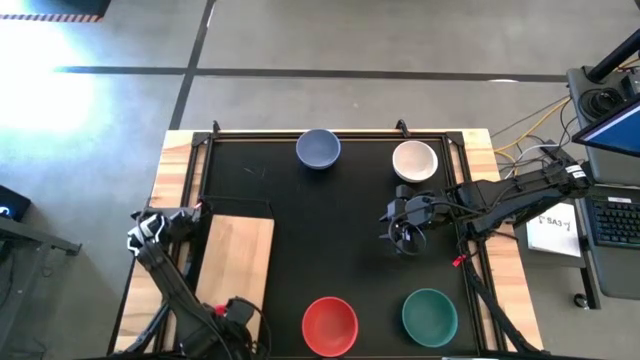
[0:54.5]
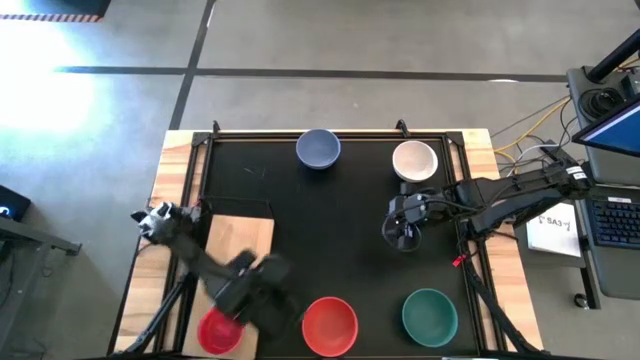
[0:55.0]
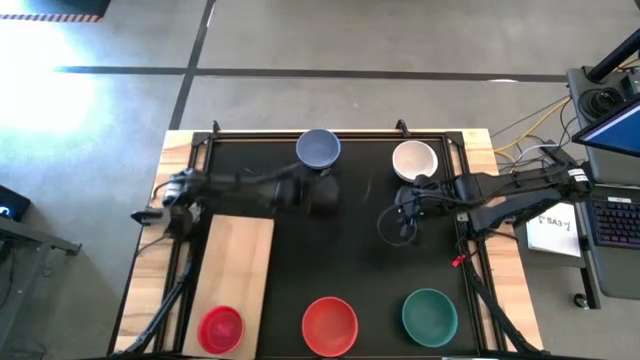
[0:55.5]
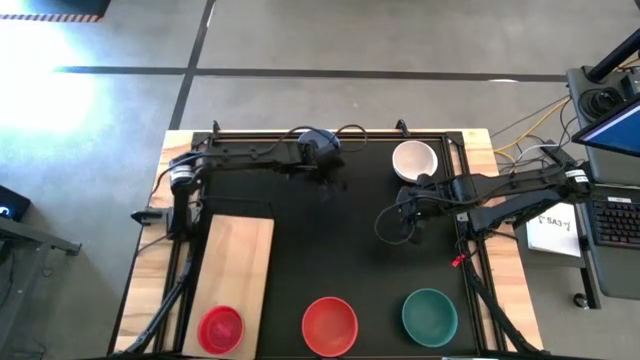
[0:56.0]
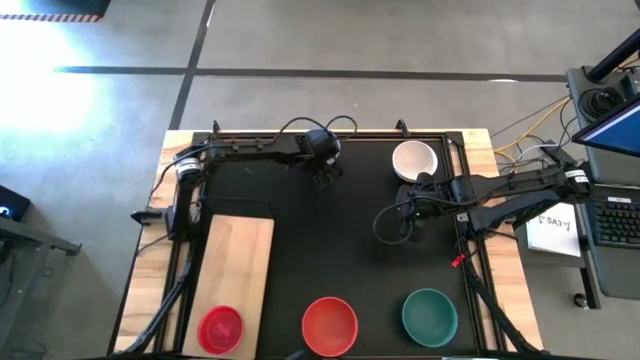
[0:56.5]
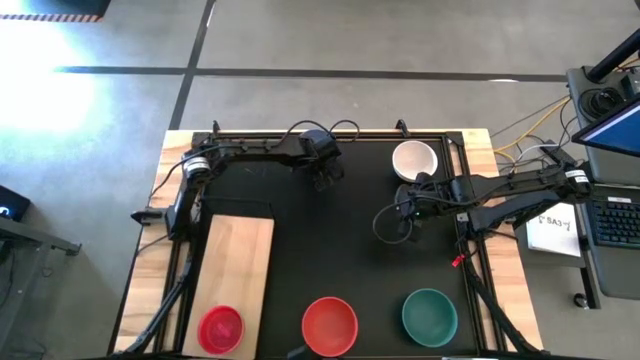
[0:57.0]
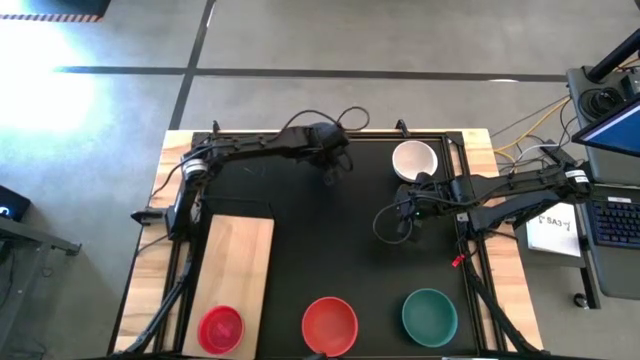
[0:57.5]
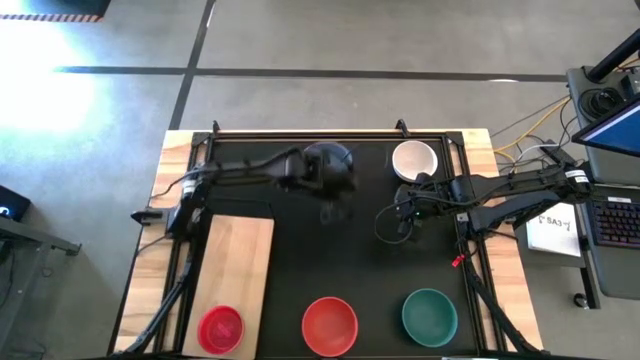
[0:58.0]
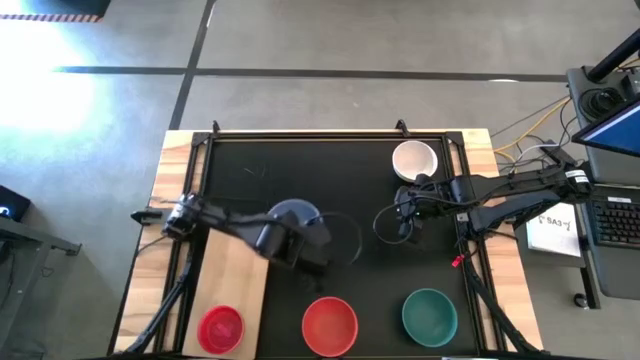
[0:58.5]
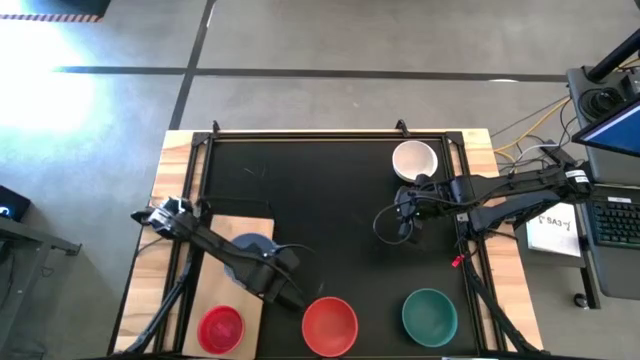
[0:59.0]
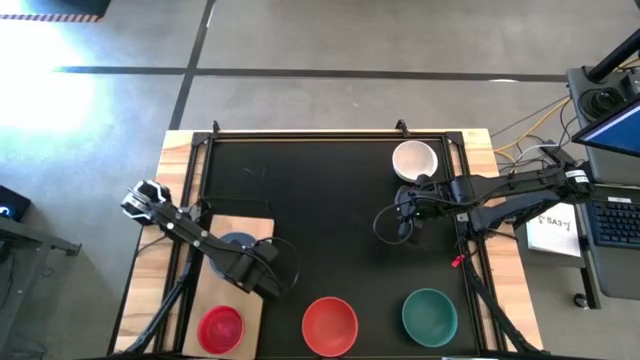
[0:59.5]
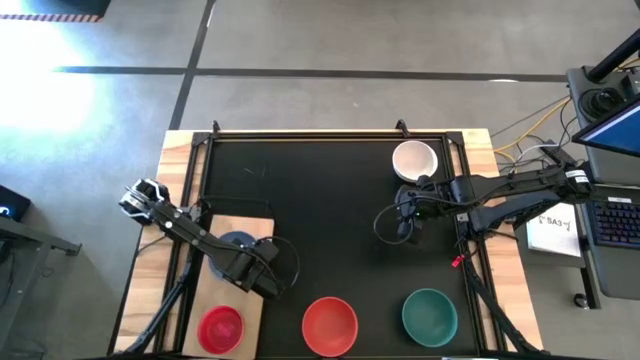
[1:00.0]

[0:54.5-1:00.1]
Task: Place and stack bowls onto a shelf
Put the blue bowl on the shelf

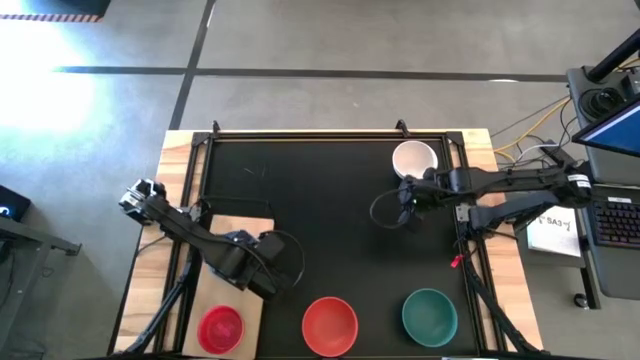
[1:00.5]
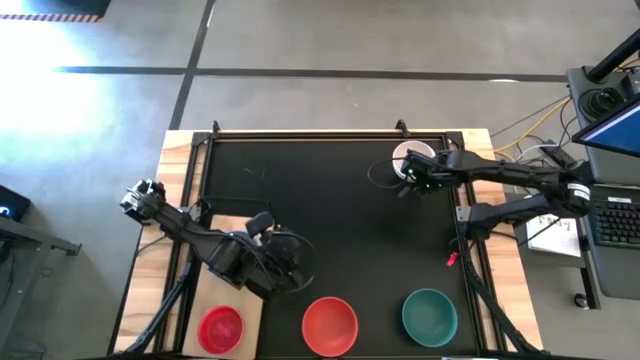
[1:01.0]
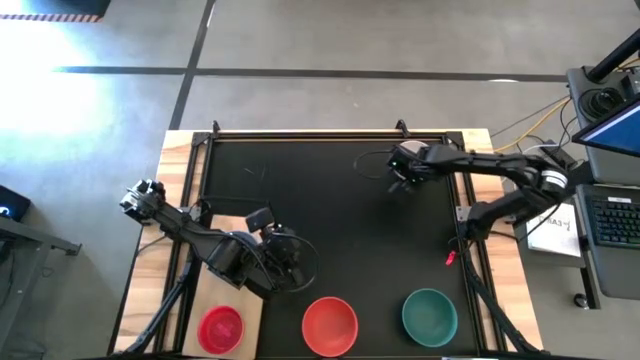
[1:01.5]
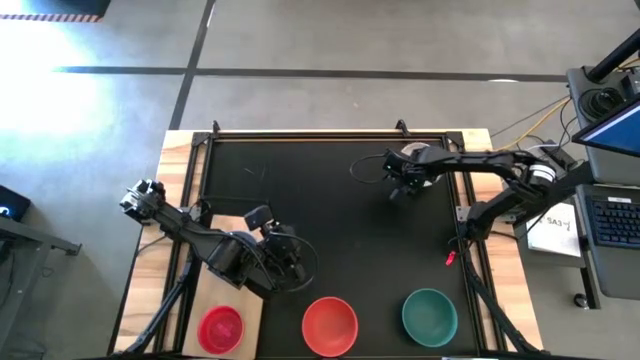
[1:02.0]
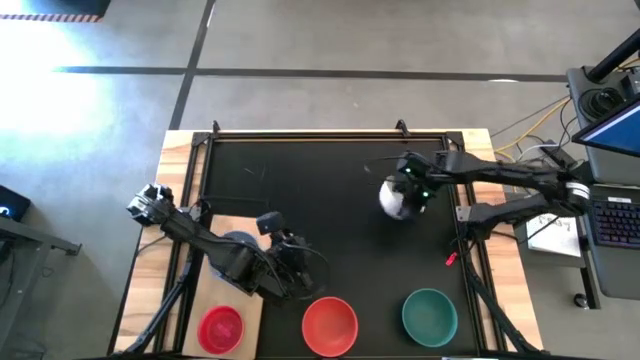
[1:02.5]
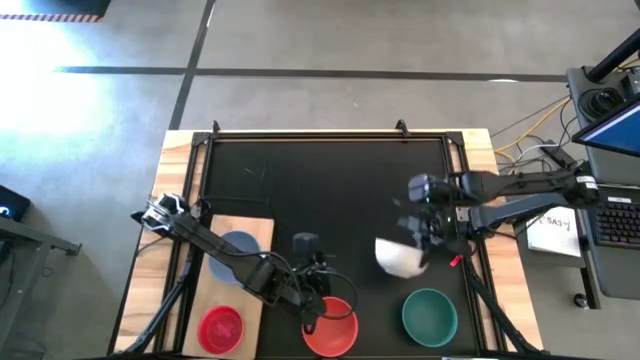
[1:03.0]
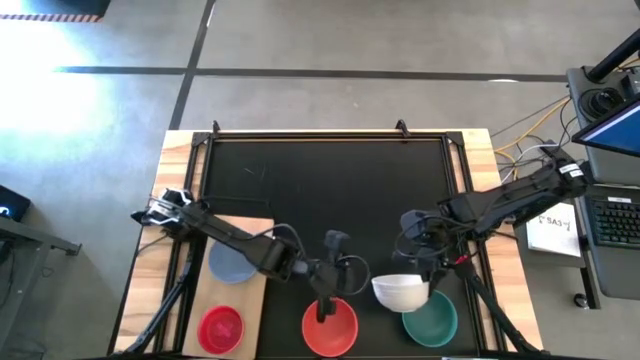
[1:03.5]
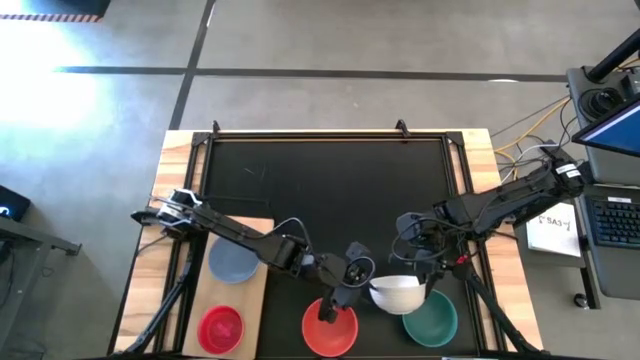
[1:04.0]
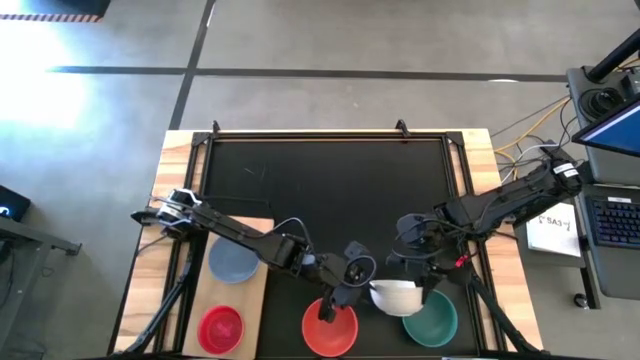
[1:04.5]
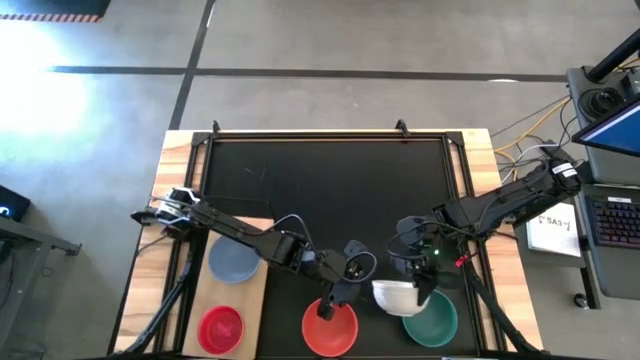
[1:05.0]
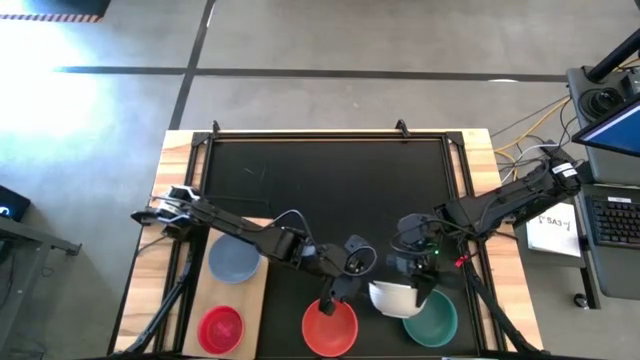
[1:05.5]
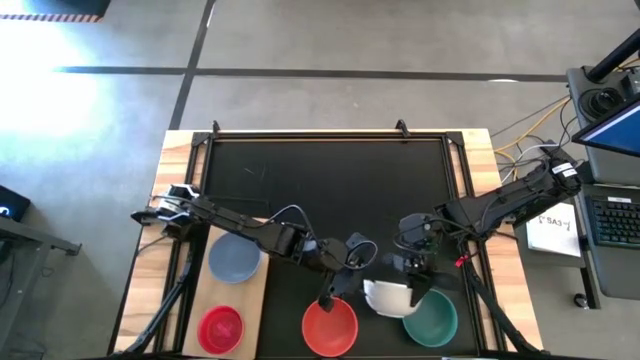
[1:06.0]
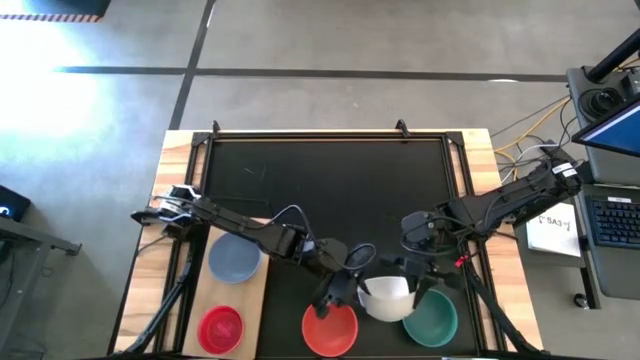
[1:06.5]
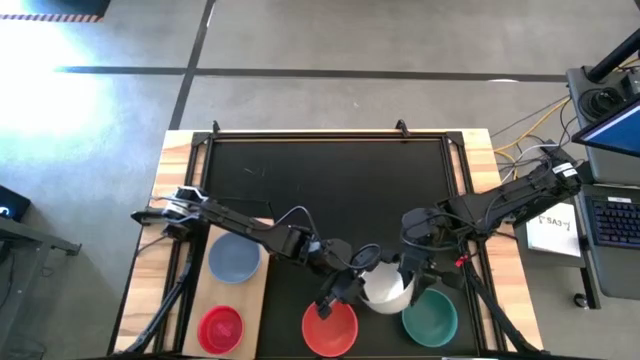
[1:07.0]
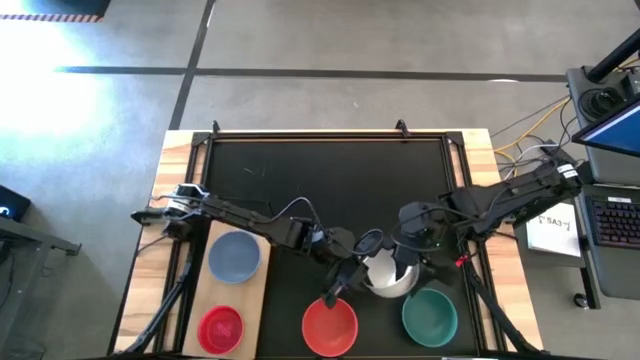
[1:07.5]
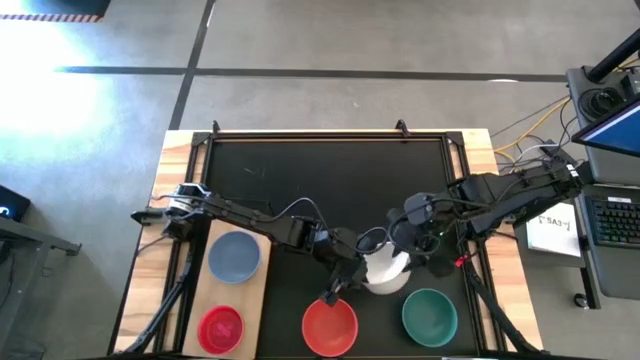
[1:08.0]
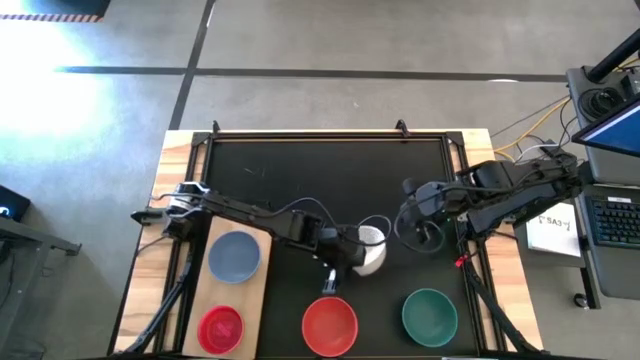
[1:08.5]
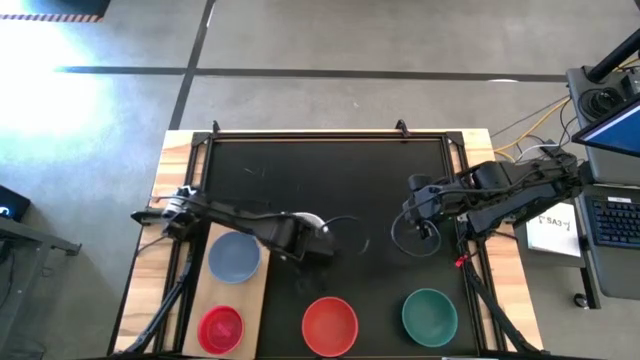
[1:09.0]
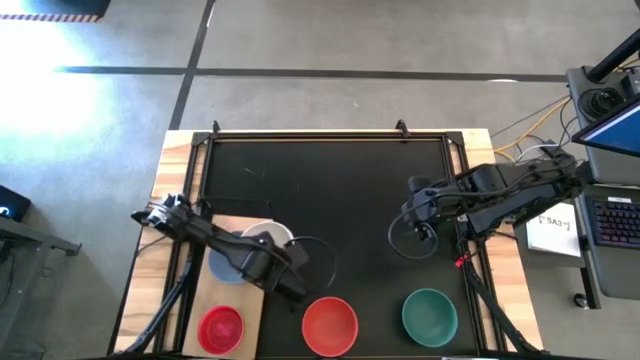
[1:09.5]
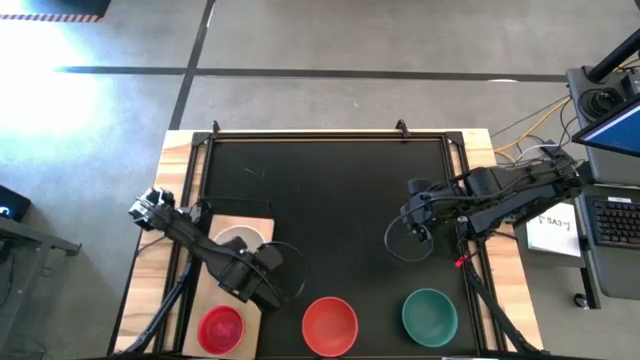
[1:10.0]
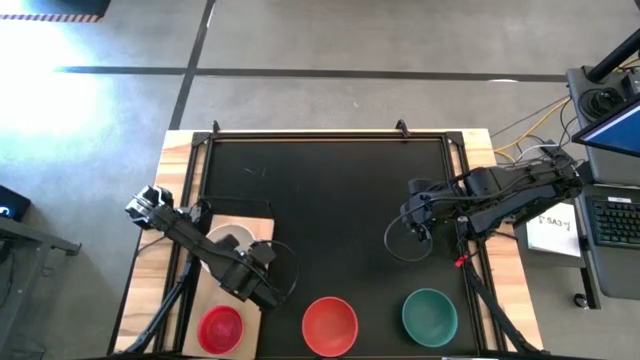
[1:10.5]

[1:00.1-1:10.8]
Stack the white bowl on the blue bowl on the shelf
